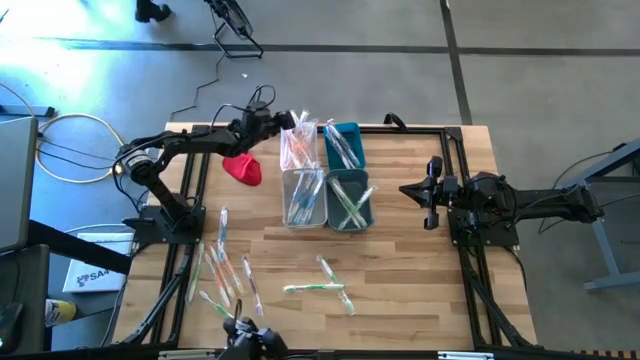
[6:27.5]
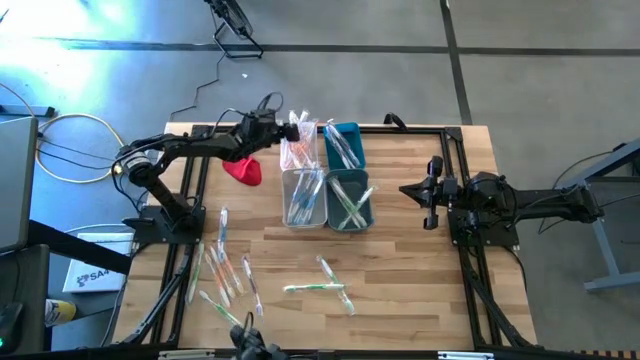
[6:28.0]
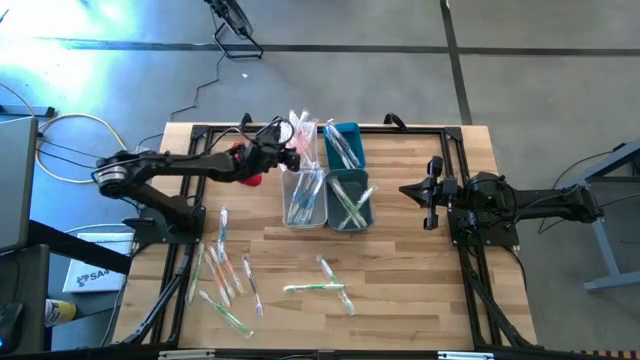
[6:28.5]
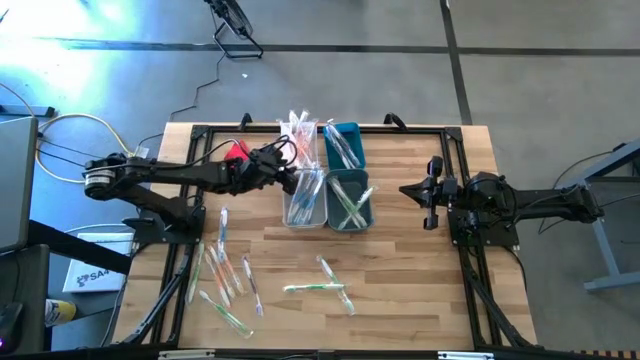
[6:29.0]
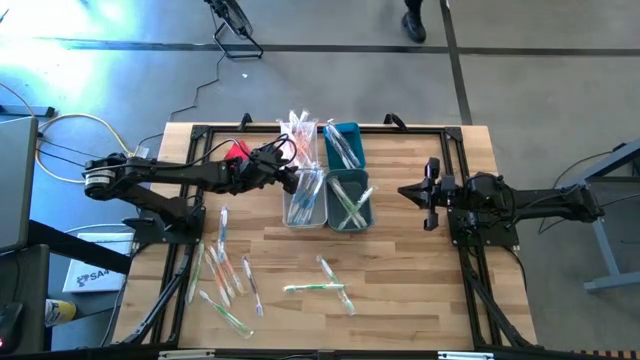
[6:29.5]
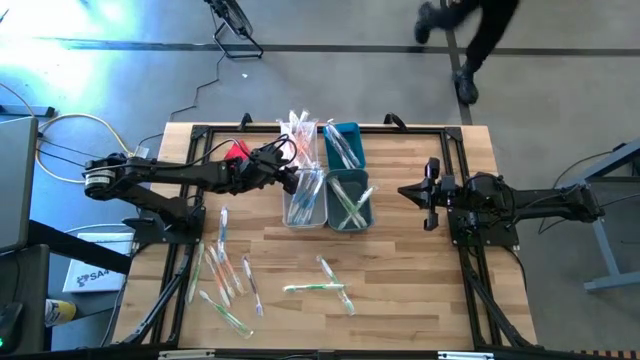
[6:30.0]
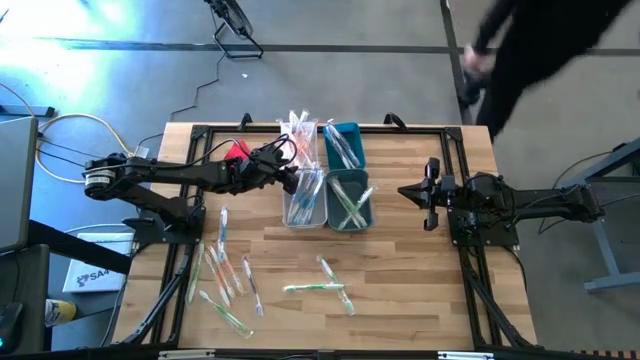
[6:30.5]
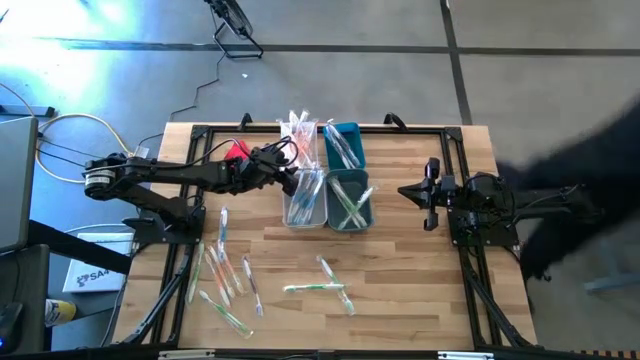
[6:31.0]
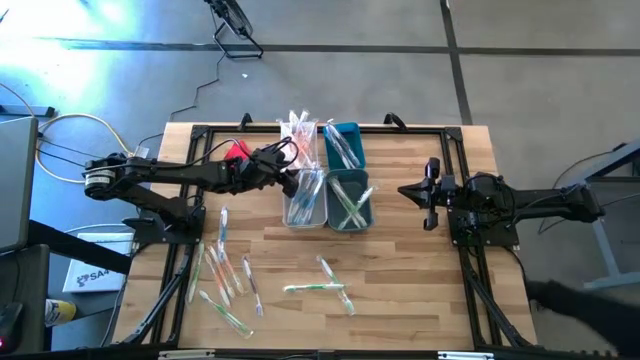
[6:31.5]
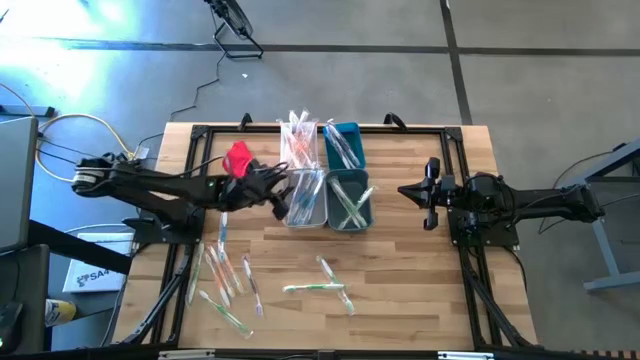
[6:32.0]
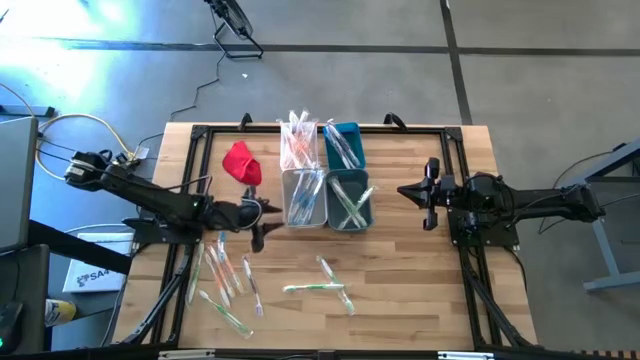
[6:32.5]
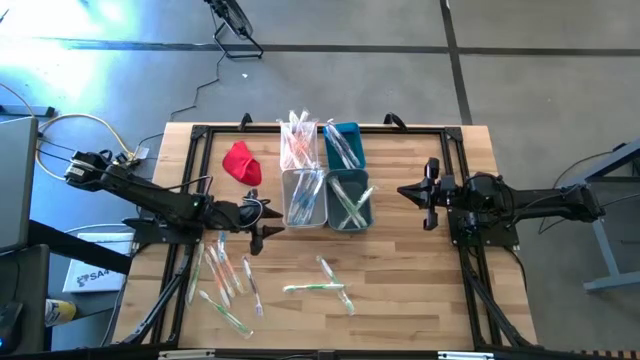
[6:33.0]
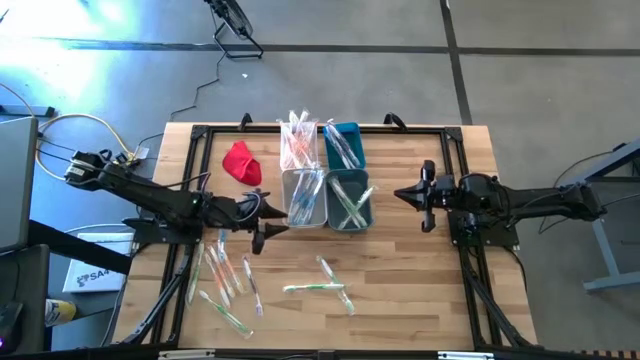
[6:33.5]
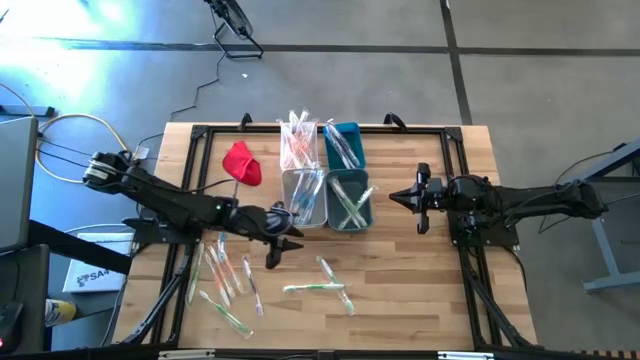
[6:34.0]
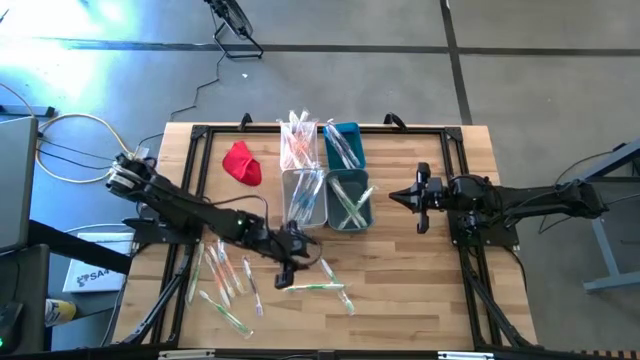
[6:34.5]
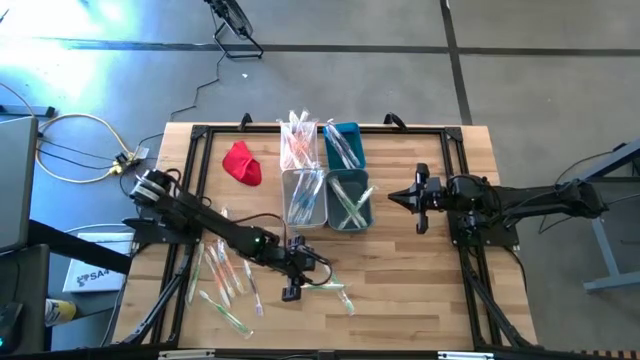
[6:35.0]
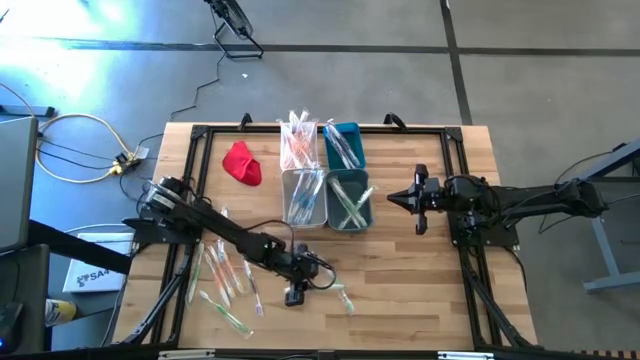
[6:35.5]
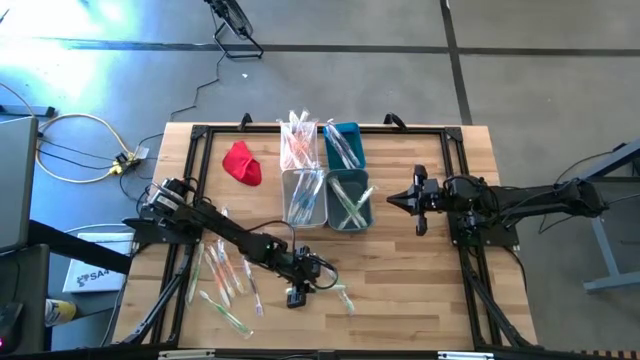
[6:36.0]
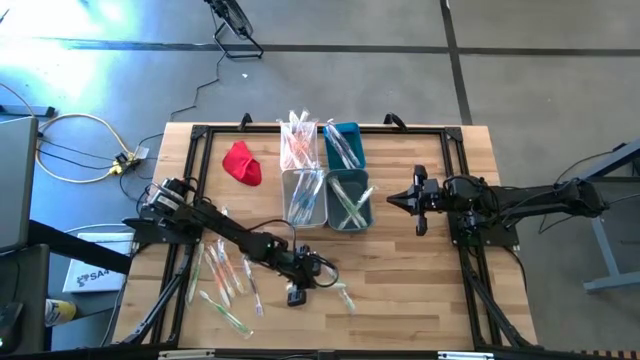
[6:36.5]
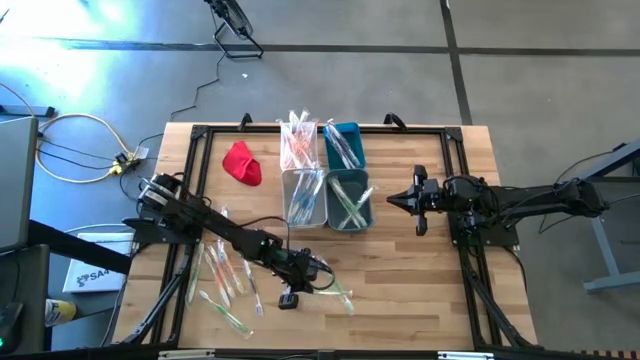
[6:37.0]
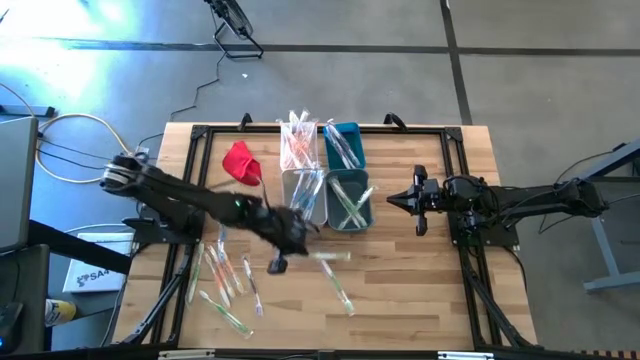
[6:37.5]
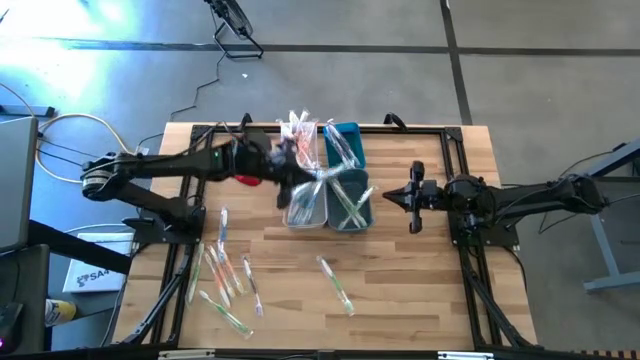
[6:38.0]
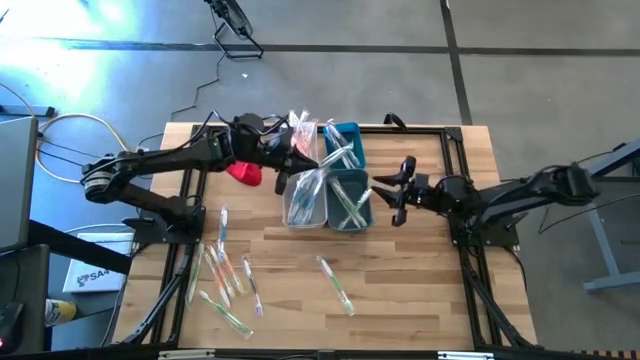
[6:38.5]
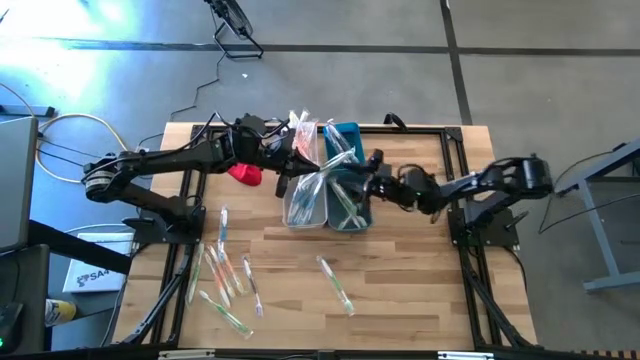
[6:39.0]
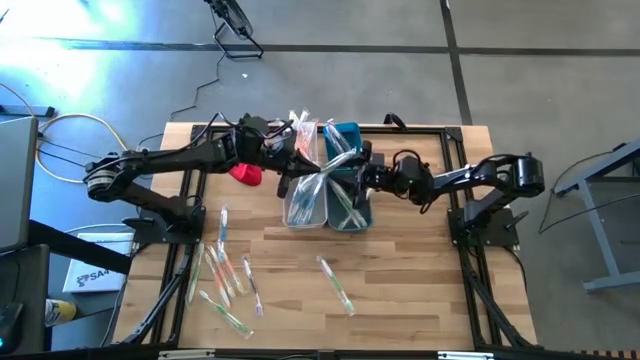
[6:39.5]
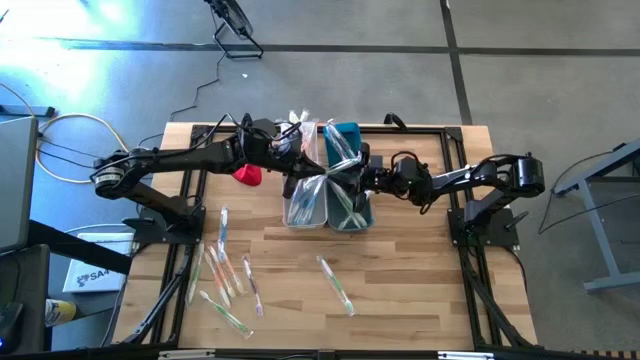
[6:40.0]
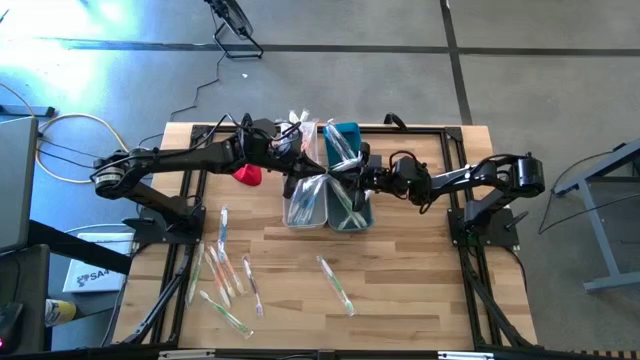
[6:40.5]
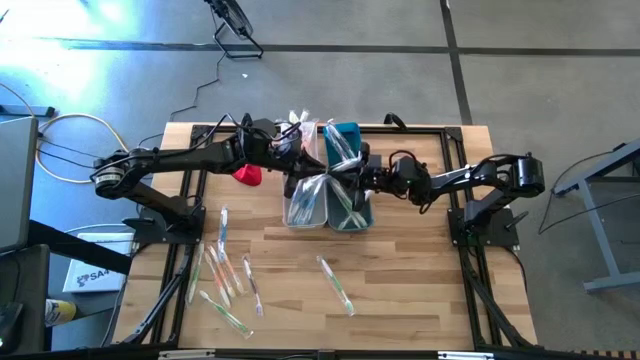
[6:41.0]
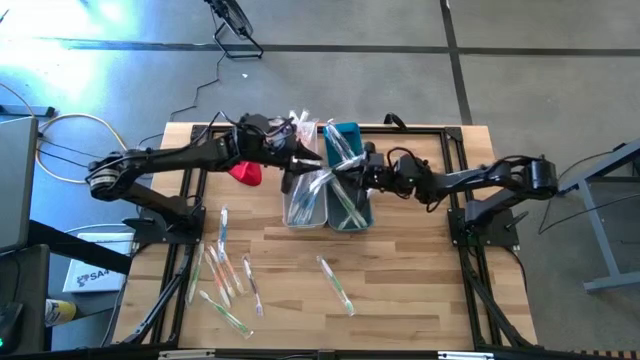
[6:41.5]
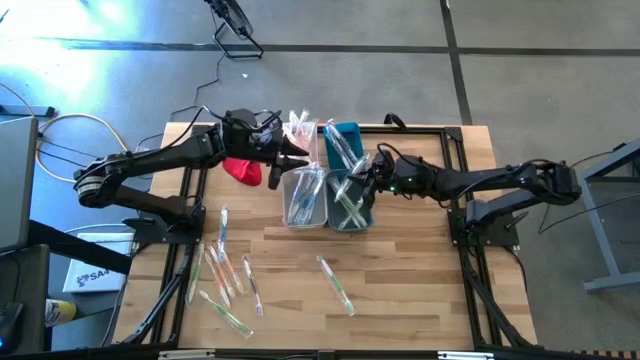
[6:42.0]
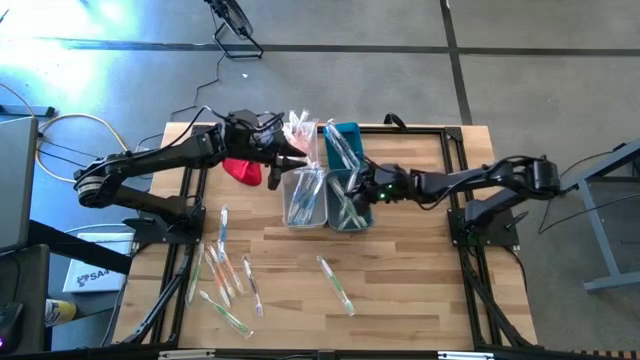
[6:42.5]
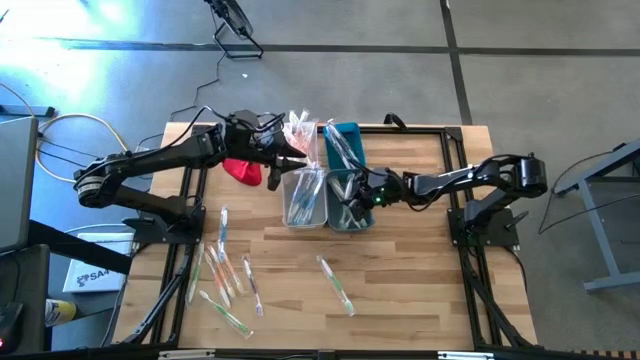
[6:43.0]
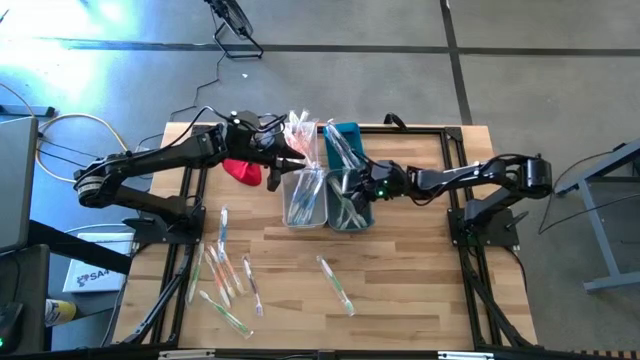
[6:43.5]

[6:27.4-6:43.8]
Task: Pick & Place Toothbrushes
Put the green toothbrush into the blue bin
